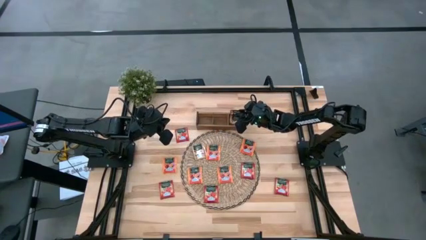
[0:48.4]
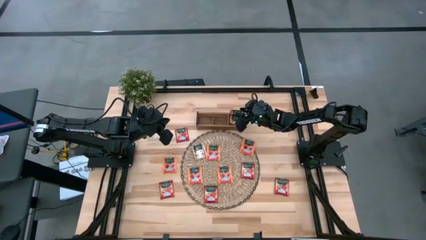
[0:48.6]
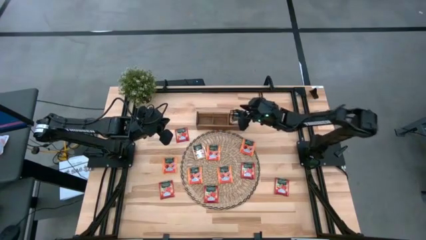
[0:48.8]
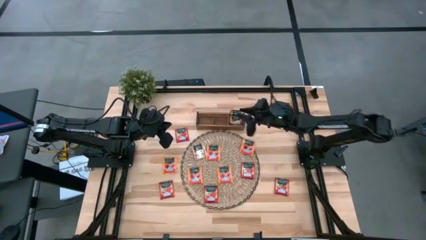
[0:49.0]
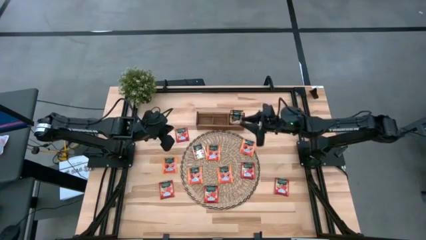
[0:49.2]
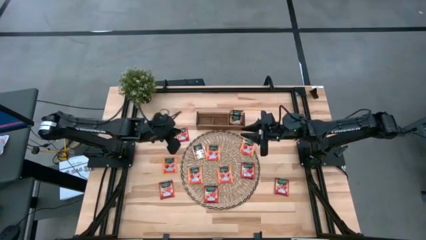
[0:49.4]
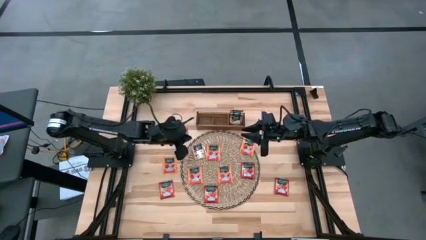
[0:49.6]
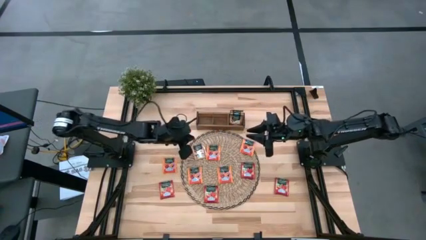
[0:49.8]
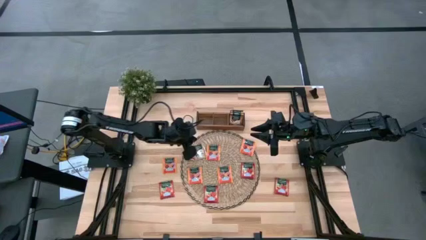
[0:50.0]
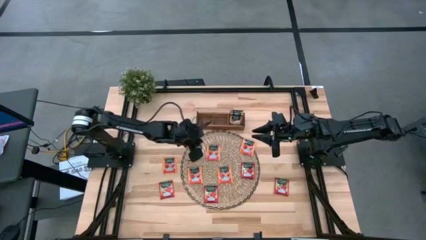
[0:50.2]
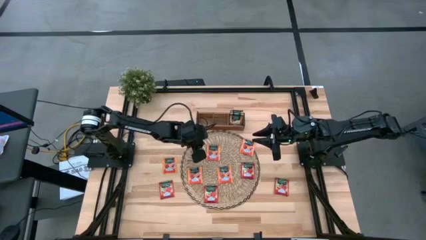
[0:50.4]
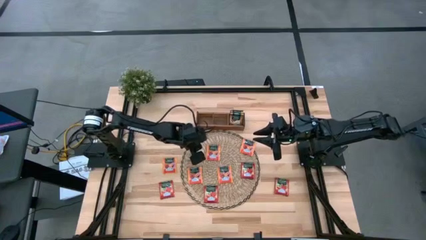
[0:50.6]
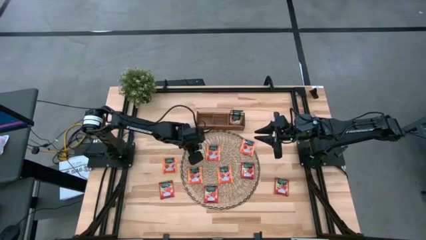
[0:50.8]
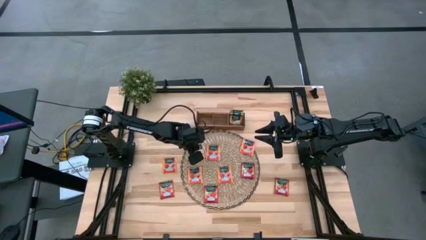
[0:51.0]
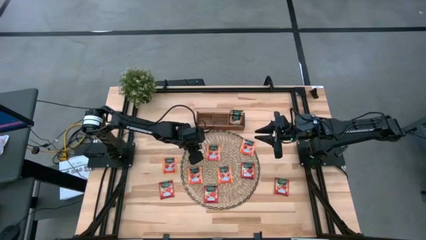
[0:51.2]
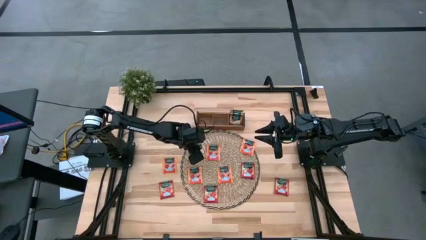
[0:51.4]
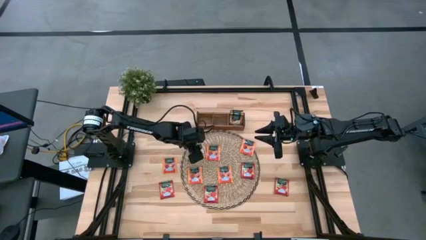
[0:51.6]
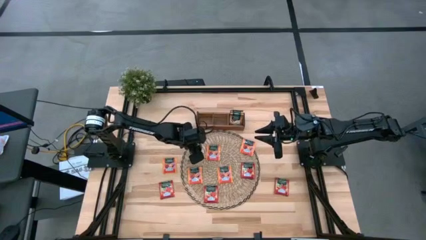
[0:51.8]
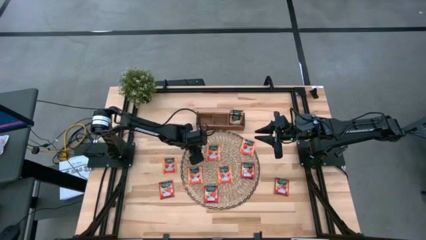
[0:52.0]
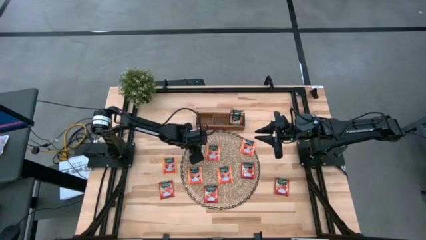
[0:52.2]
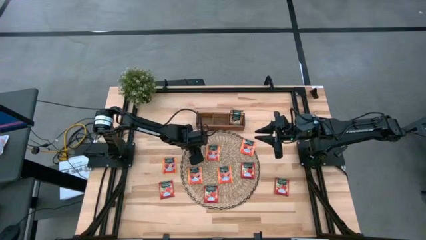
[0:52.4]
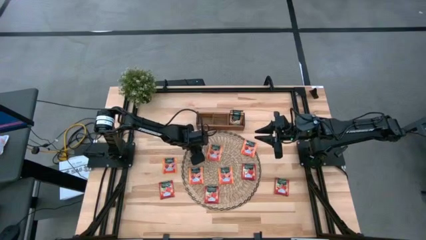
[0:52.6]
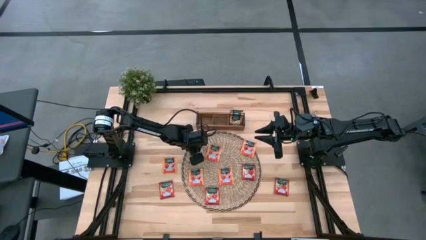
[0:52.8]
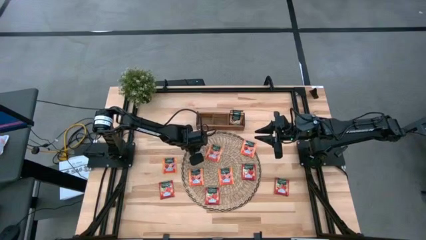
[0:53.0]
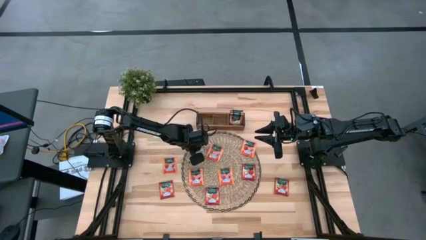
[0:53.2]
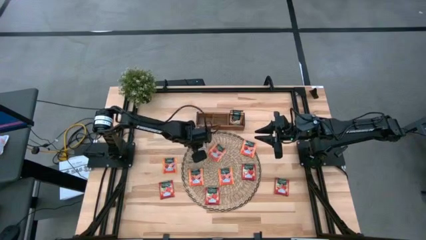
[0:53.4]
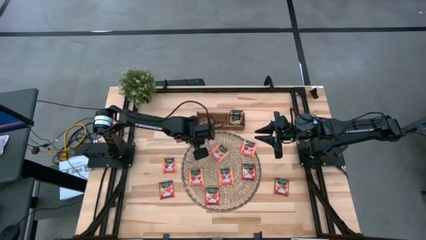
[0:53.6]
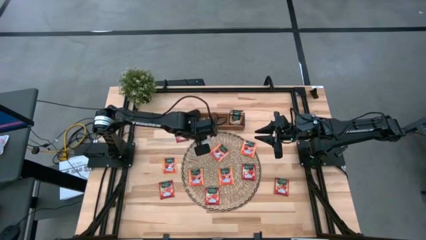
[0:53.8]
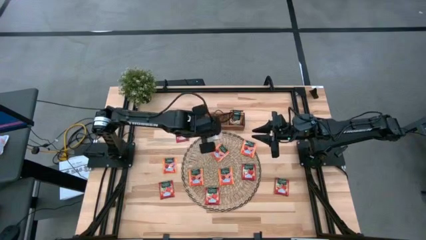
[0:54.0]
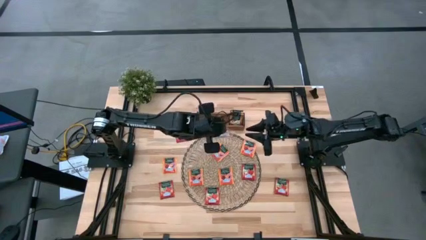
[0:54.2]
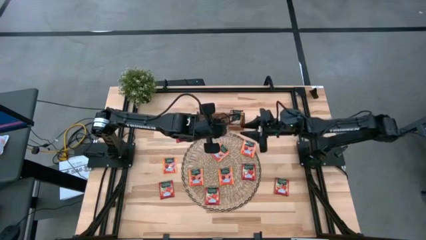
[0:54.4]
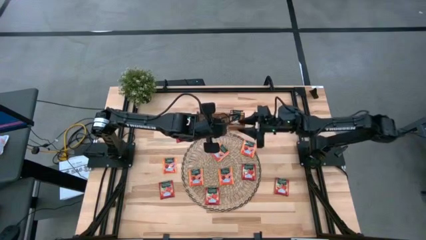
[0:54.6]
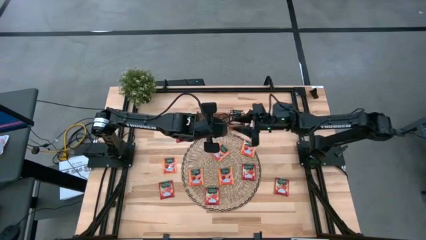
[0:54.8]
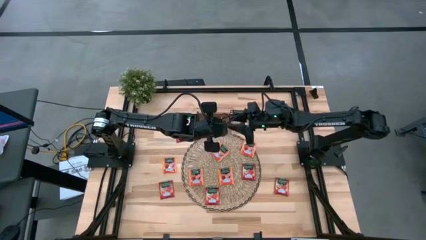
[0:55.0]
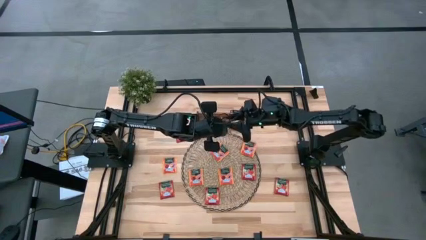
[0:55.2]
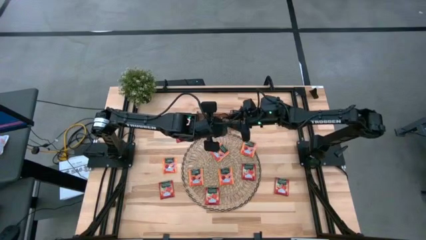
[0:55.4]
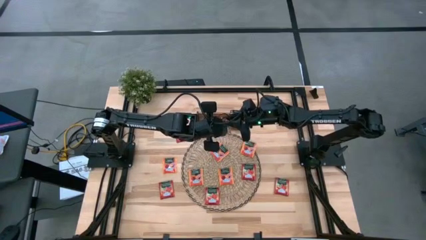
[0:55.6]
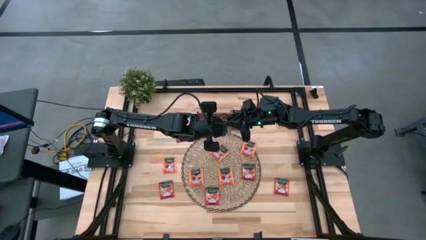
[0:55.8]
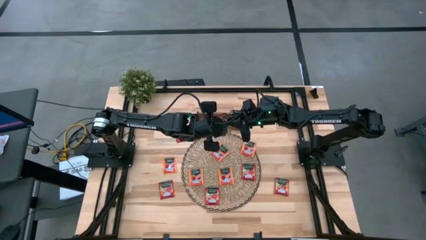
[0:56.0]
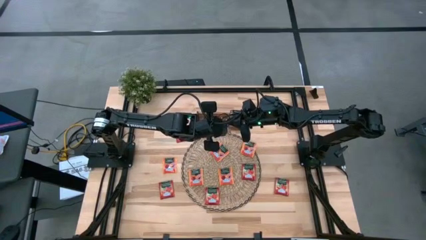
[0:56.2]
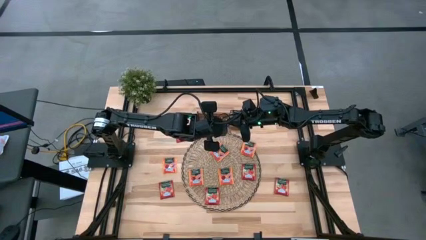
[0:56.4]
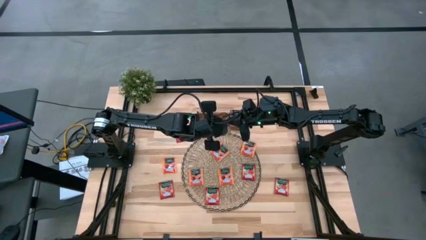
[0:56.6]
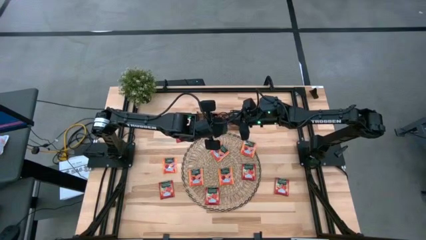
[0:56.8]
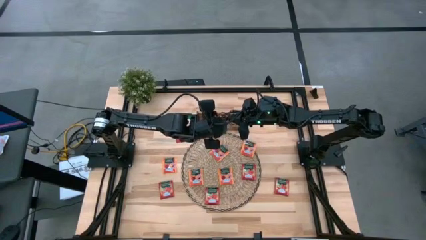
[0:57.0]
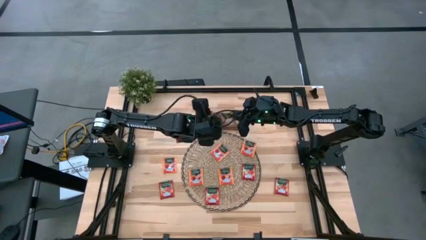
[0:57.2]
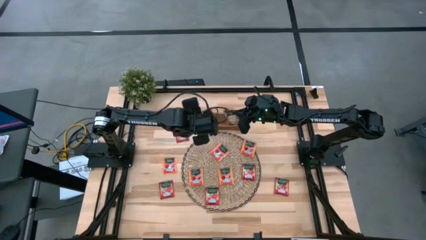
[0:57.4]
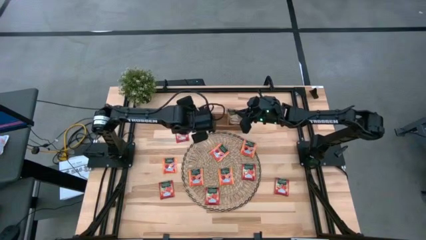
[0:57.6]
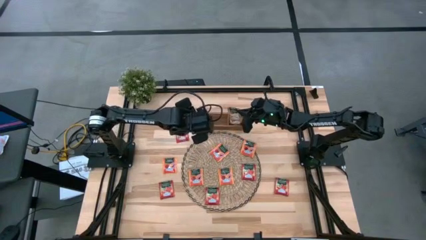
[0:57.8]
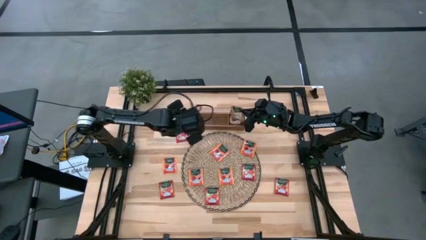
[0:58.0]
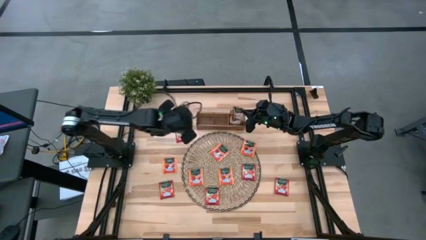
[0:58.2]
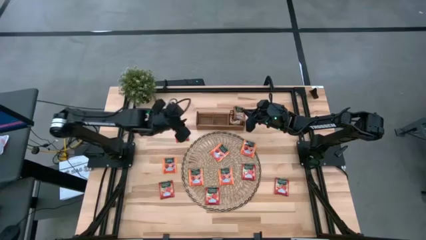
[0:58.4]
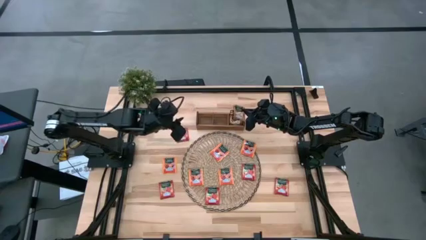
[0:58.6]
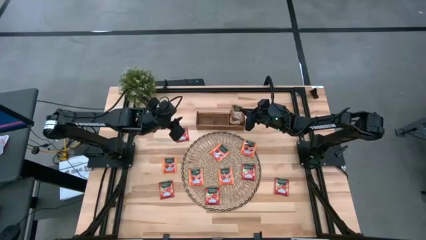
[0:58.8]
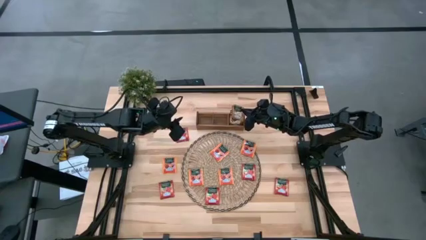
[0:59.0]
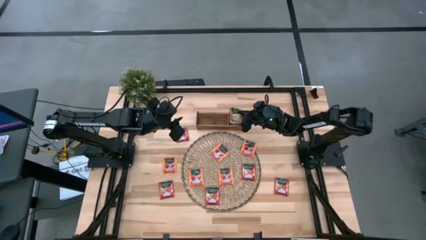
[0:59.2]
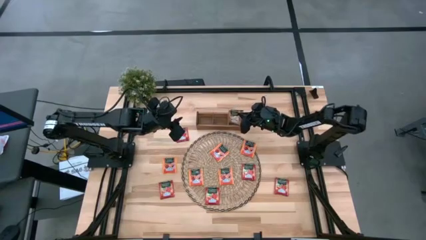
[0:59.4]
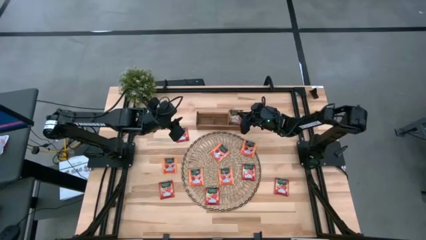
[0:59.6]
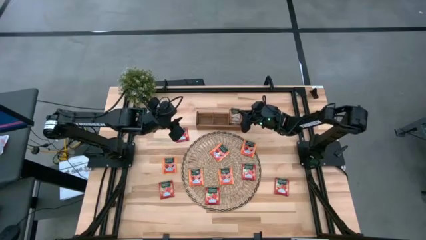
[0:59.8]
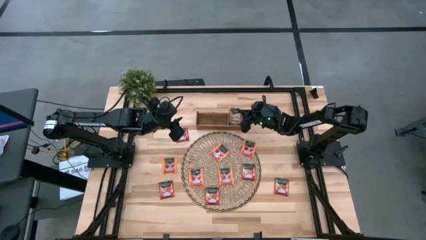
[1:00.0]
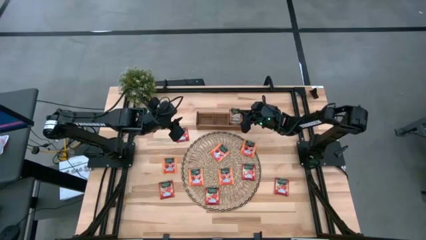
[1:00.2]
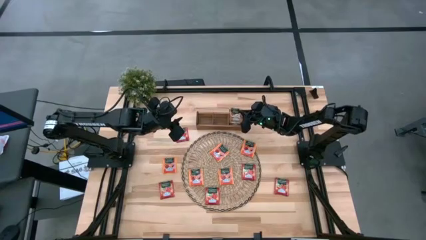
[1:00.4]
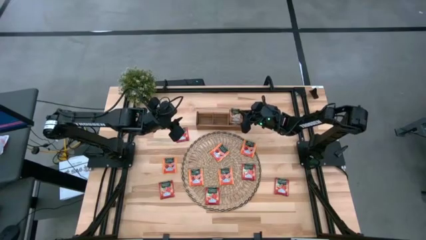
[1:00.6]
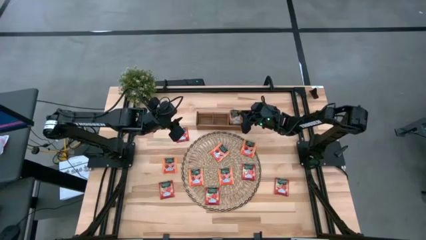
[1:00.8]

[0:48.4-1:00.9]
Task: Pick & Place Tea
Put the brown tea bag into the right section of the wooden organizer
